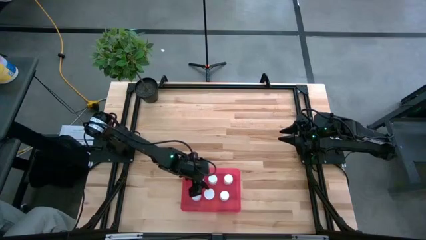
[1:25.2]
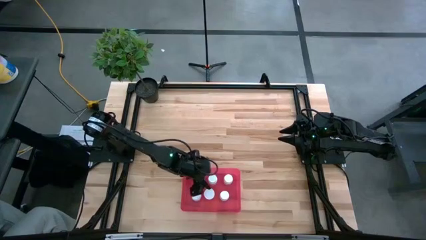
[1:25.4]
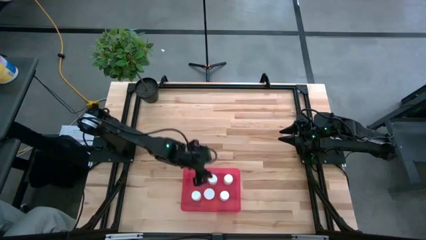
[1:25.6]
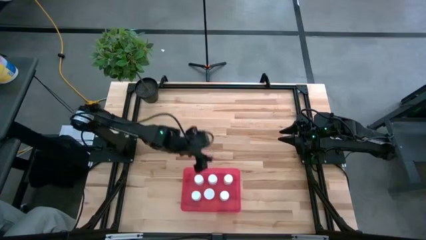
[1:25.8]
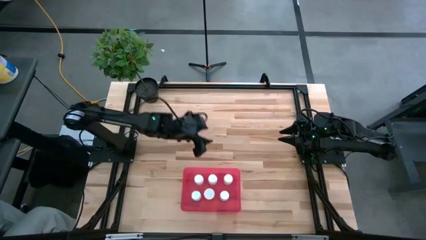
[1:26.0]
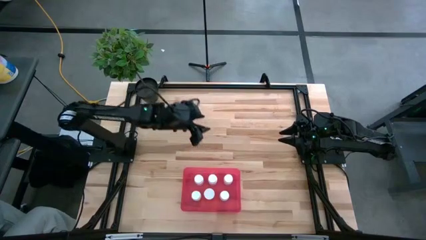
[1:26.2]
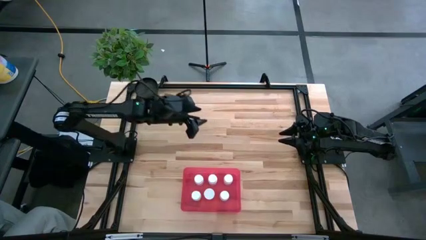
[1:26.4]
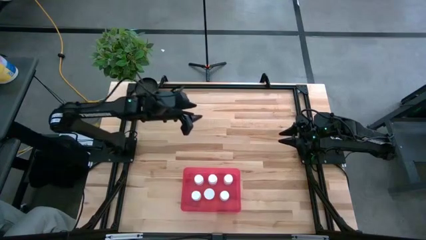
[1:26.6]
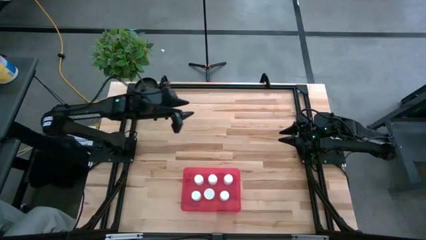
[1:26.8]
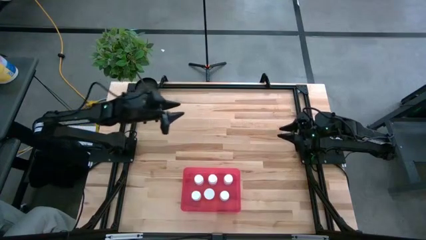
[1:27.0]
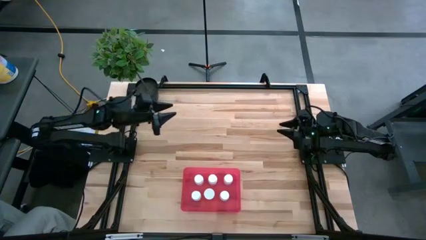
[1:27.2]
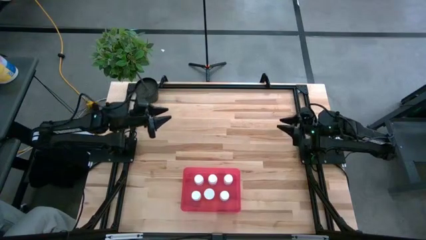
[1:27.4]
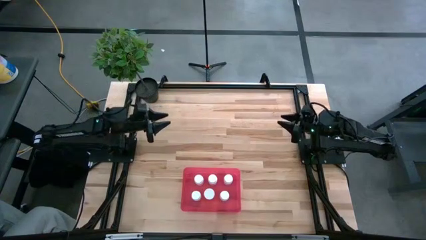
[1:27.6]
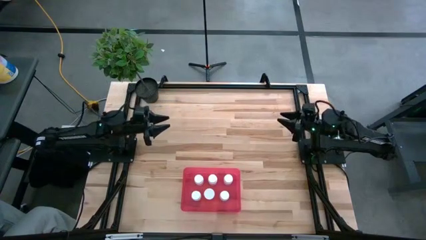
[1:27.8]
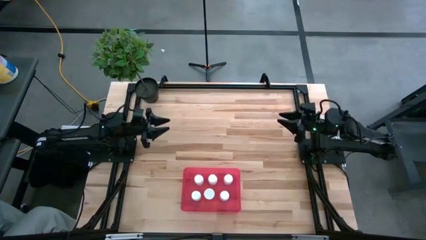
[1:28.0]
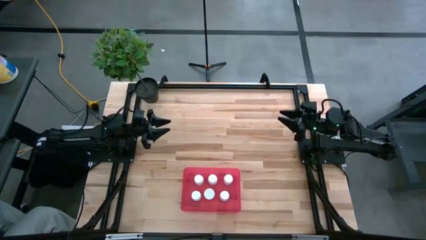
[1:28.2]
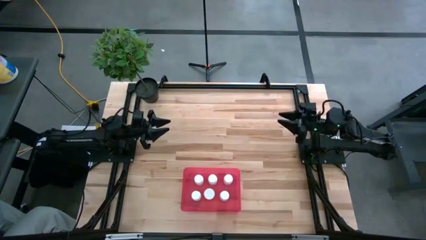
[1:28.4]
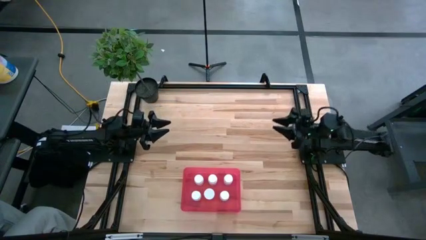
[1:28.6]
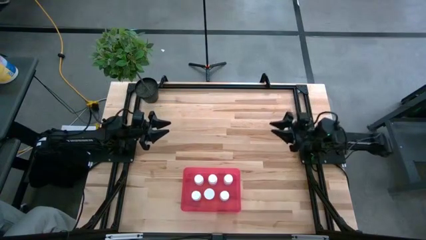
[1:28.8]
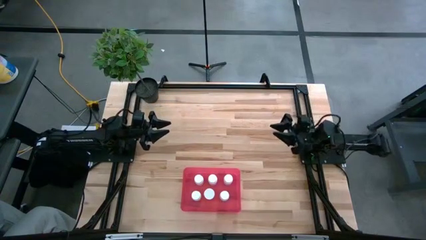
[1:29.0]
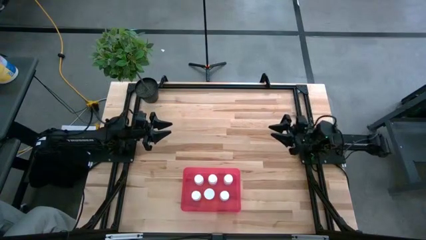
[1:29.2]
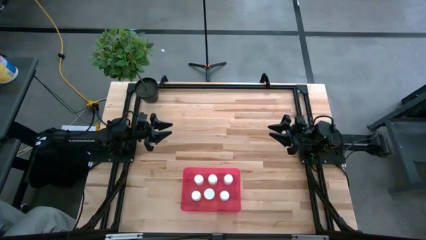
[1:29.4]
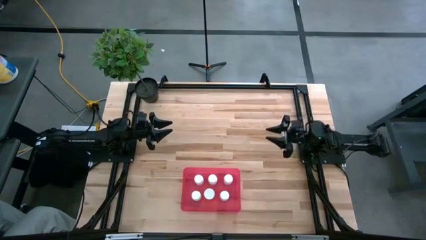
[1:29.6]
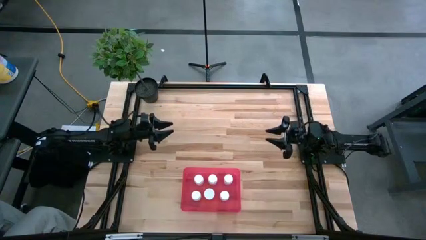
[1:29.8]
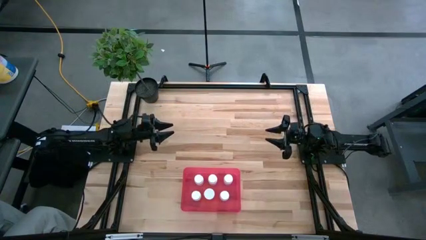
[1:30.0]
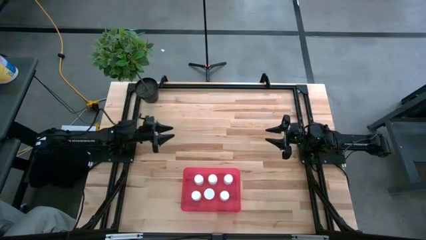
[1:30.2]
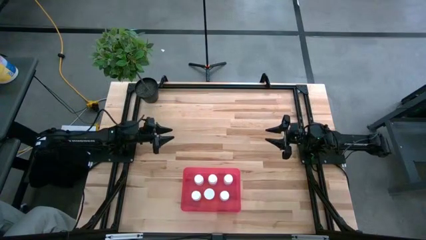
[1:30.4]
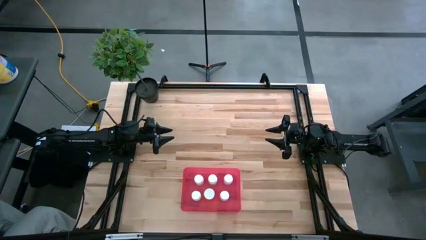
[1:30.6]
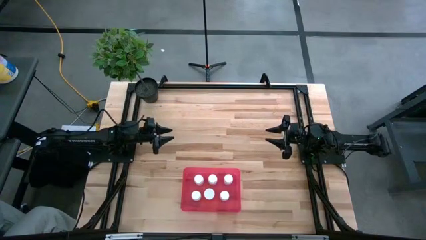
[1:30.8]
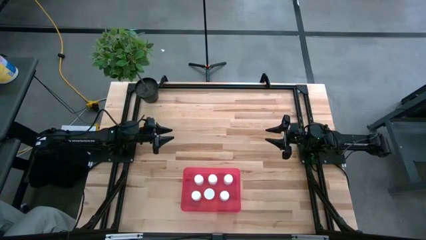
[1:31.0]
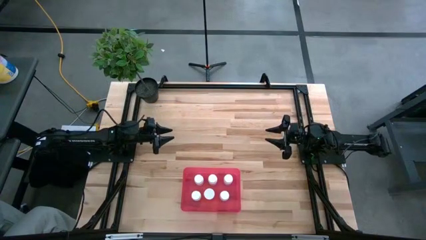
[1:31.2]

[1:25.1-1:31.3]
Task: Pick and place pill bottles into a basket
Return to Home Position

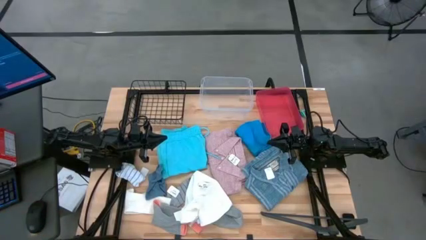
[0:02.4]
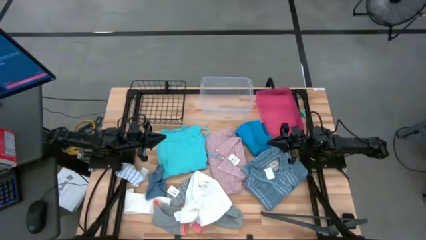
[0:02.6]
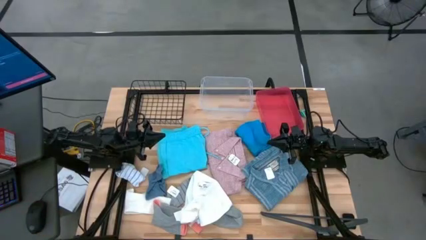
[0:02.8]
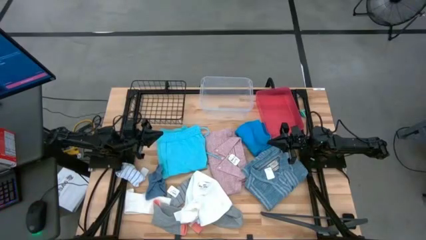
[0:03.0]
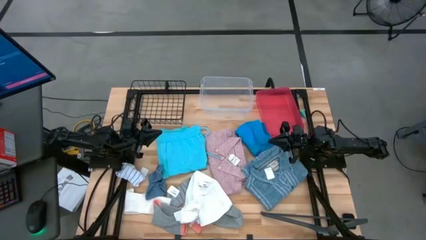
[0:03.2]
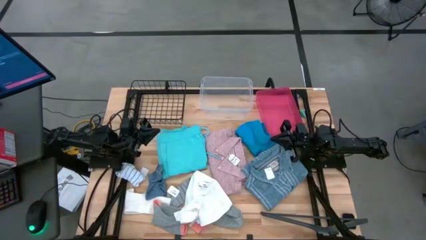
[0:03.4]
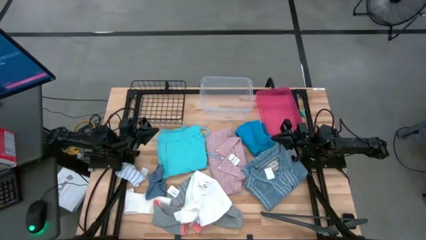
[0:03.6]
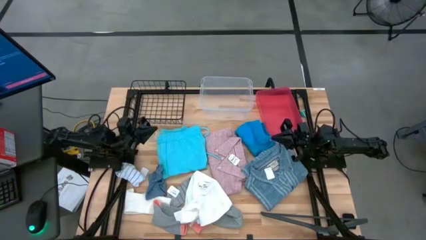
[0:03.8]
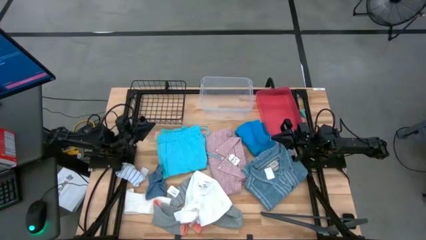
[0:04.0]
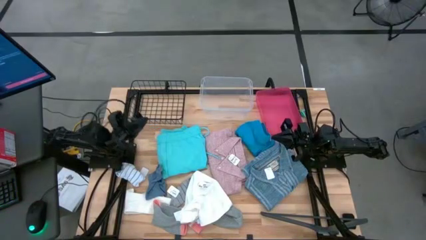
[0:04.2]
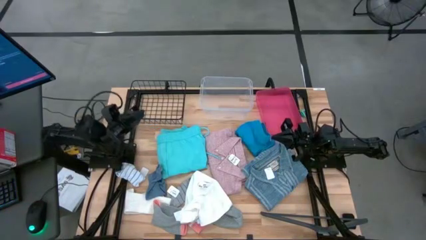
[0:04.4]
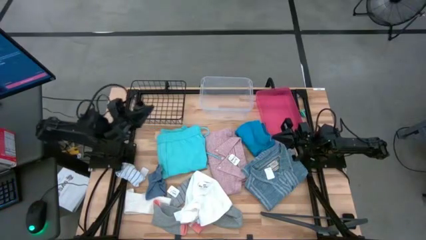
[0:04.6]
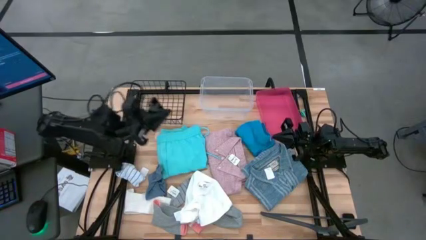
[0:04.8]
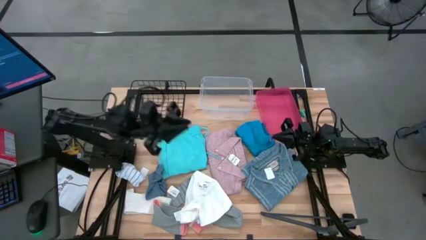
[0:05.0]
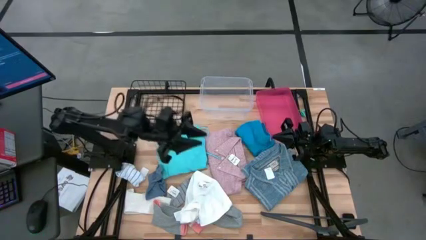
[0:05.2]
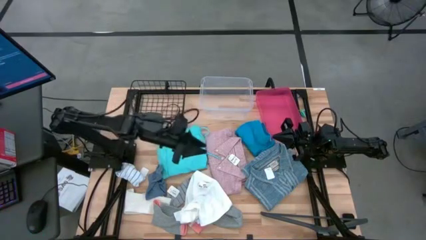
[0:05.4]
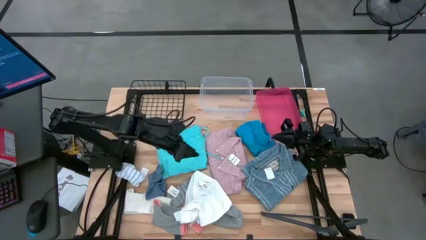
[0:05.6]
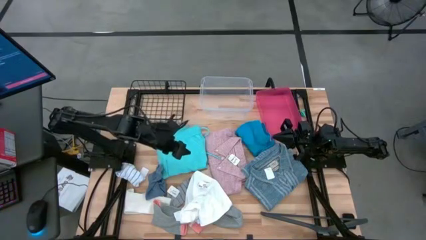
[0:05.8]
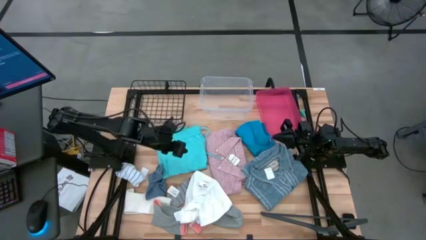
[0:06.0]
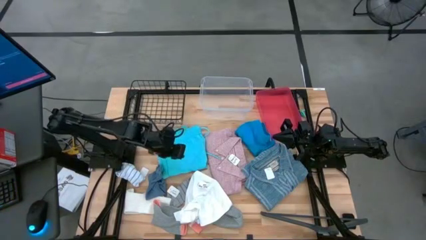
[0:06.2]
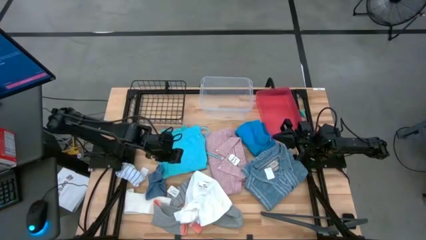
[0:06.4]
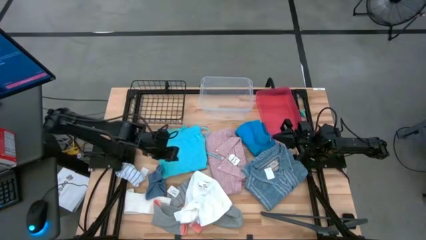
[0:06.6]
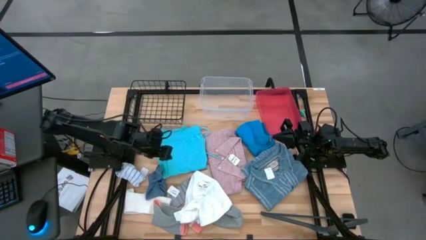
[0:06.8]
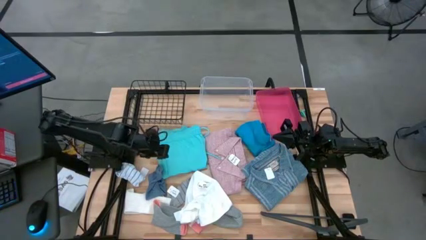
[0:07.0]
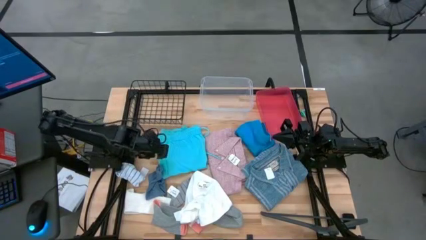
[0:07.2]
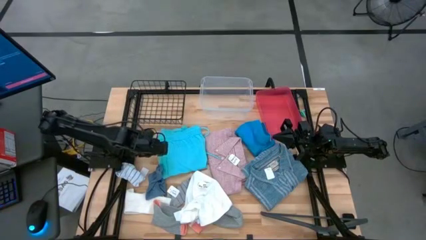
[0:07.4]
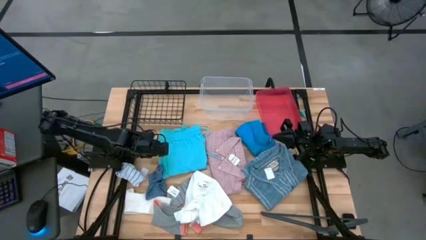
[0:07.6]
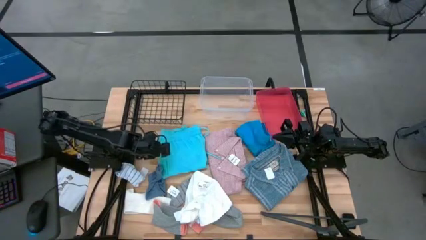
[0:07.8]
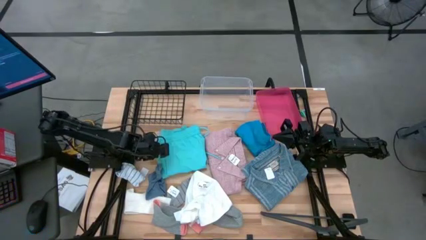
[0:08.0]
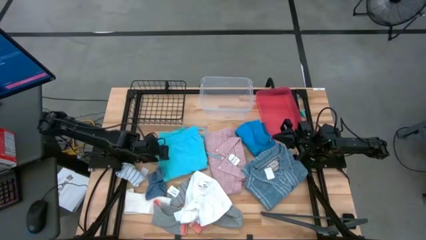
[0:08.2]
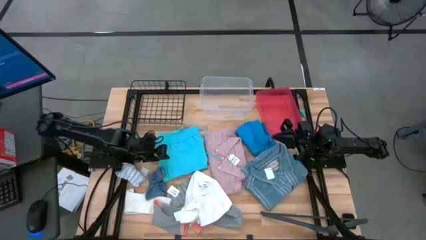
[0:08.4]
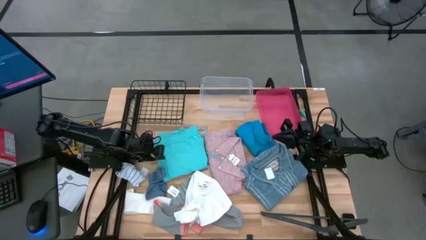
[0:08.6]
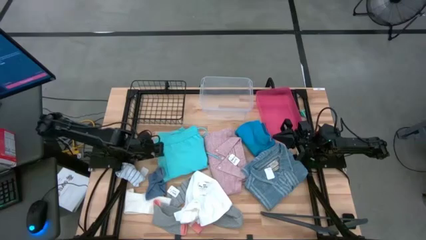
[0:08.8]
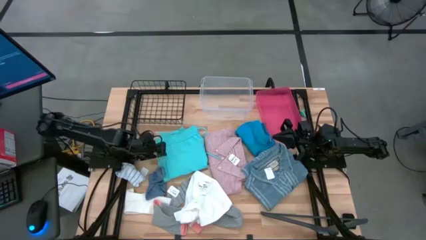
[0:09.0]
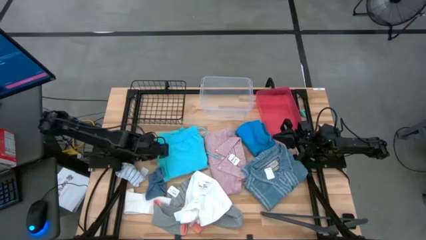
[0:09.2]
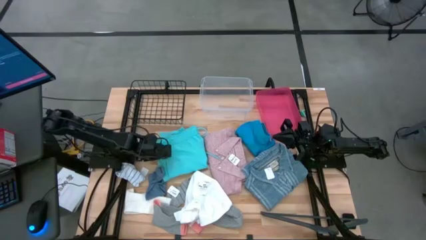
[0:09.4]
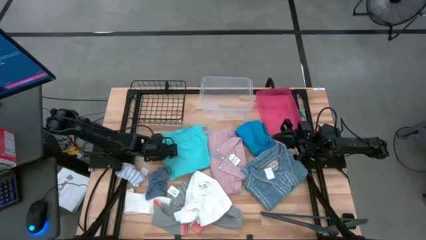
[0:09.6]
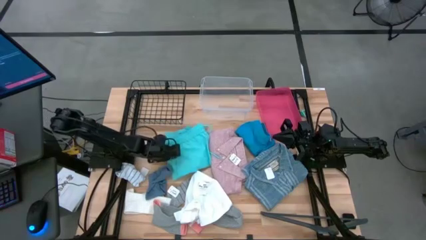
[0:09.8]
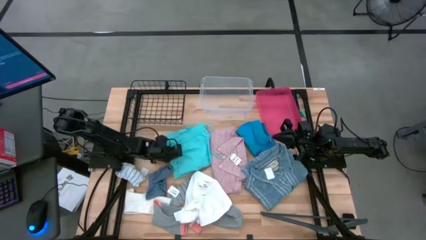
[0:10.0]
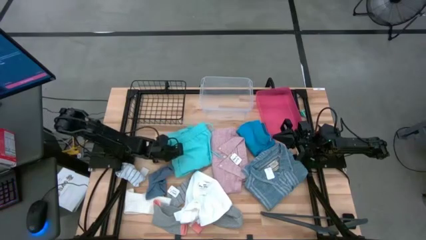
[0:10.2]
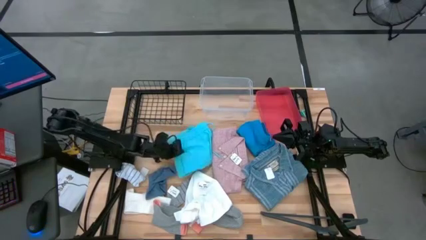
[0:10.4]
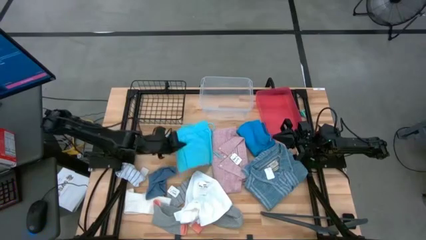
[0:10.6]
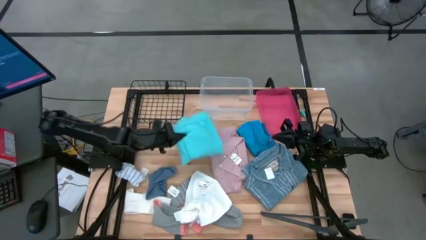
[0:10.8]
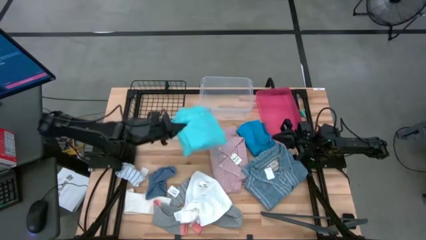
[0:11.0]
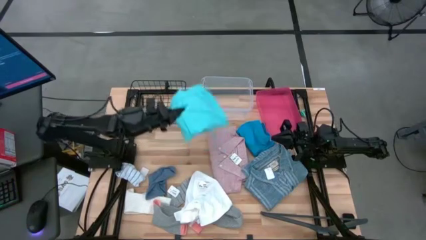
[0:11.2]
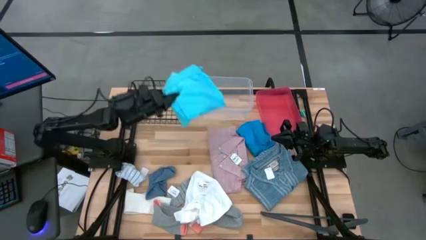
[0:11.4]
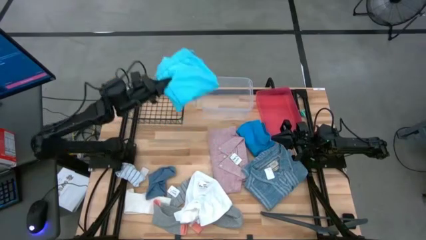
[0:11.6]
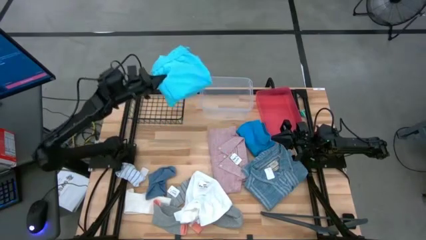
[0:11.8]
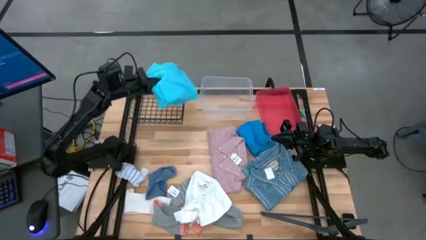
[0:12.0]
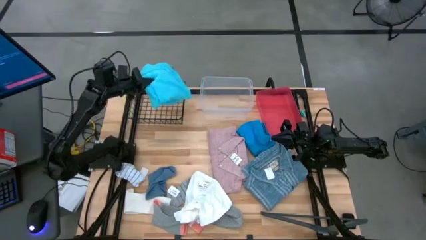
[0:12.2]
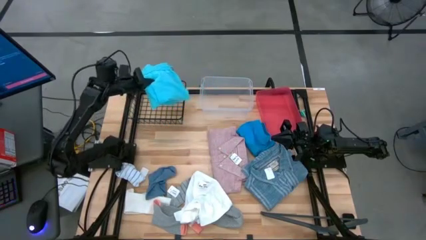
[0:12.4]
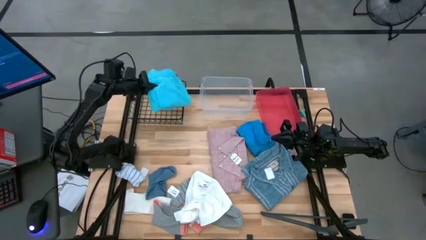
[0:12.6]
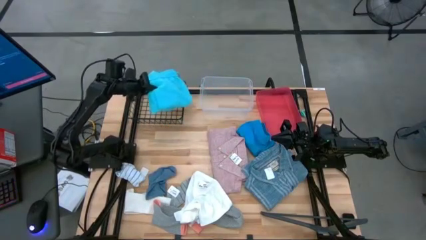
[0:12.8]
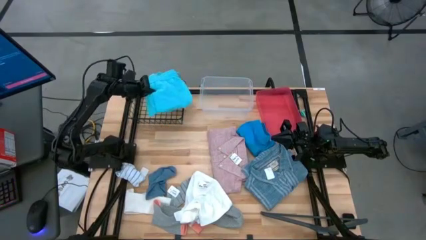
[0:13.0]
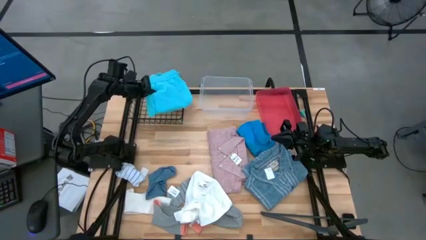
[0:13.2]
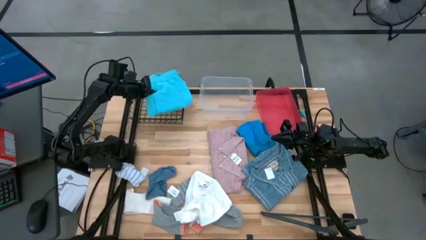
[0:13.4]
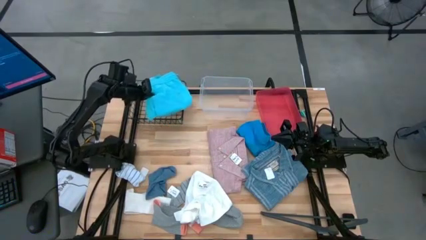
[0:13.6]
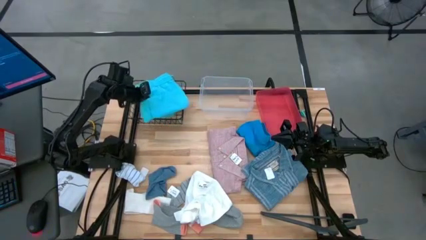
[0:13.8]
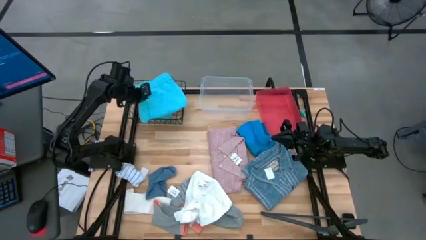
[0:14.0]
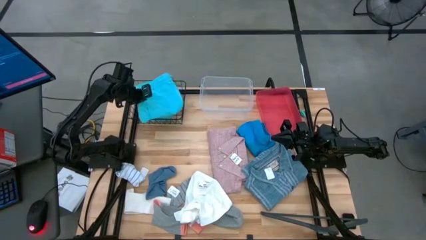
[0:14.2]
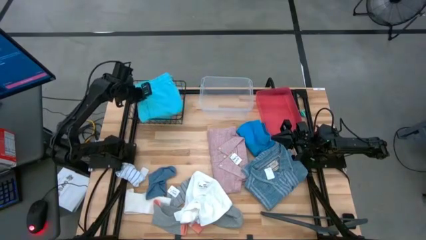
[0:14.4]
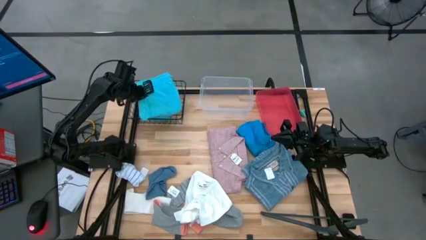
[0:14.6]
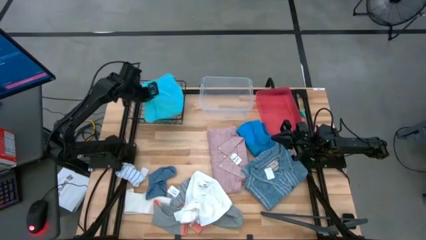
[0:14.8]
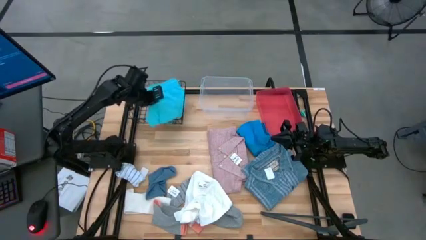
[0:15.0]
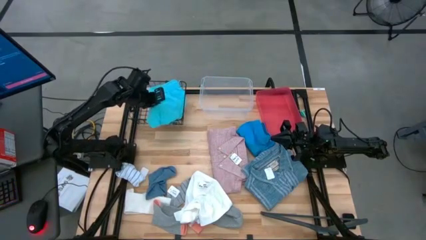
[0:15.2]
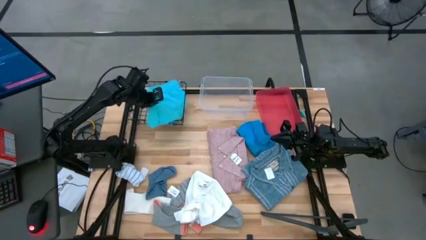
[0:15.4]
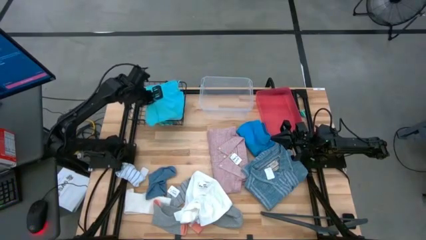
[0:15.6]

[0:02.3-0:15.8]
Task: Pick & Place Cloths
Put the light blue shorts into the black wire basket
